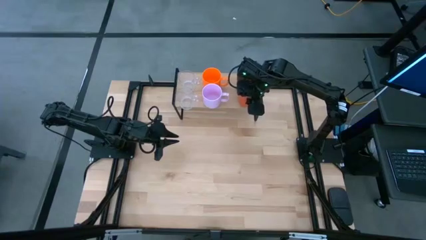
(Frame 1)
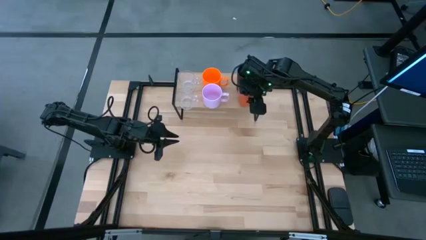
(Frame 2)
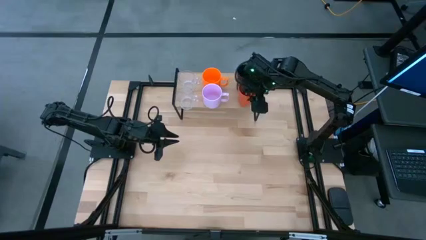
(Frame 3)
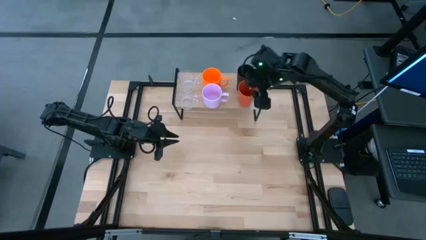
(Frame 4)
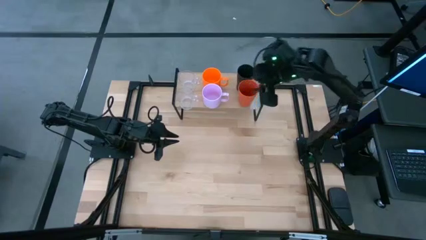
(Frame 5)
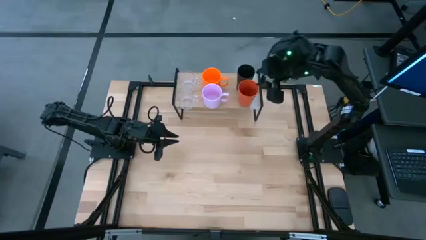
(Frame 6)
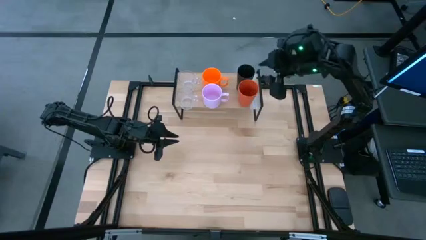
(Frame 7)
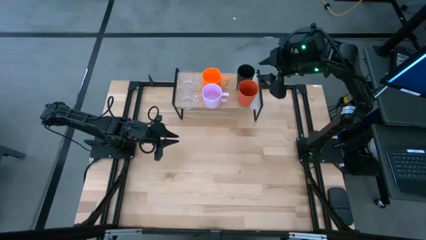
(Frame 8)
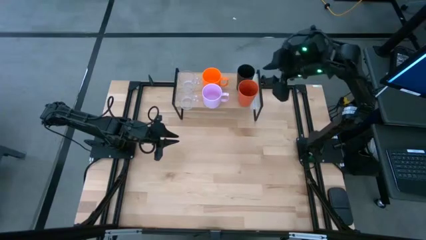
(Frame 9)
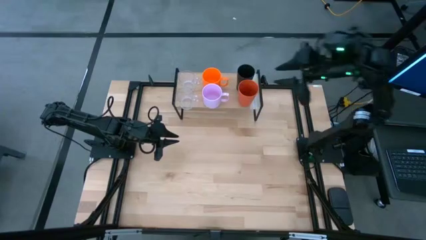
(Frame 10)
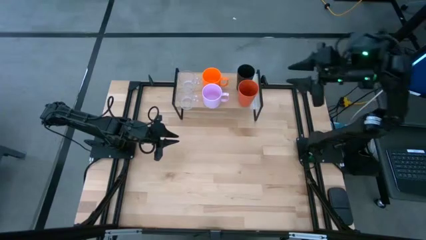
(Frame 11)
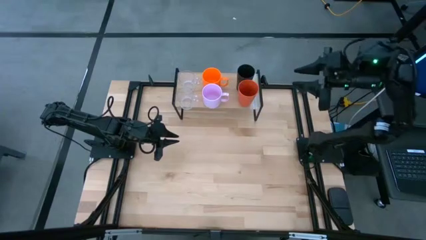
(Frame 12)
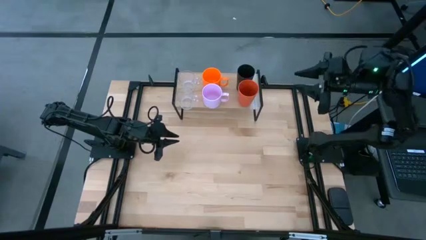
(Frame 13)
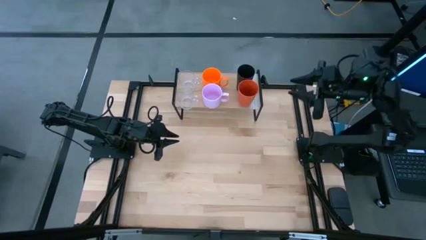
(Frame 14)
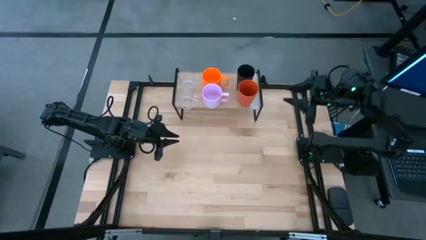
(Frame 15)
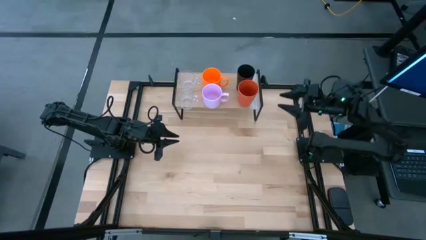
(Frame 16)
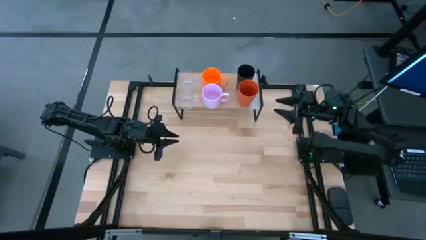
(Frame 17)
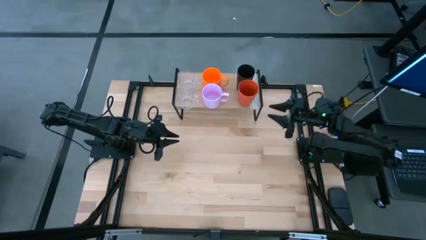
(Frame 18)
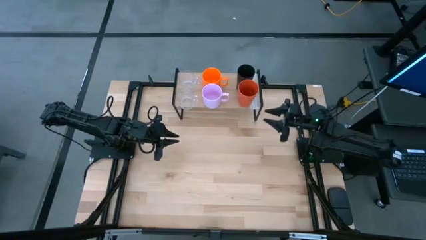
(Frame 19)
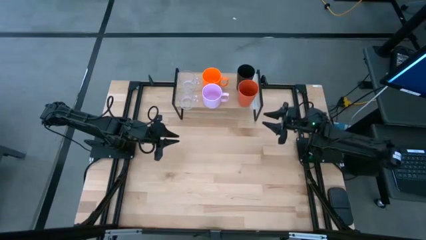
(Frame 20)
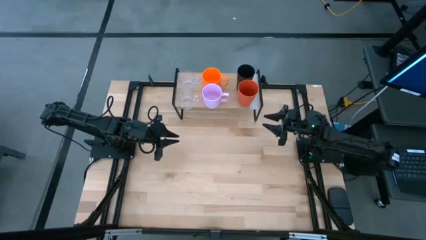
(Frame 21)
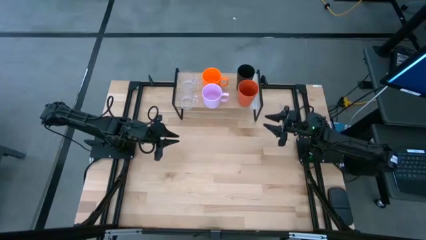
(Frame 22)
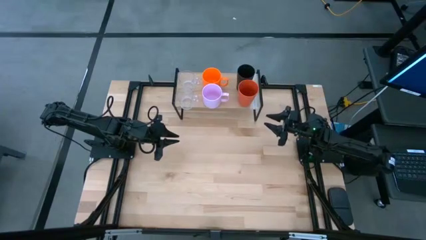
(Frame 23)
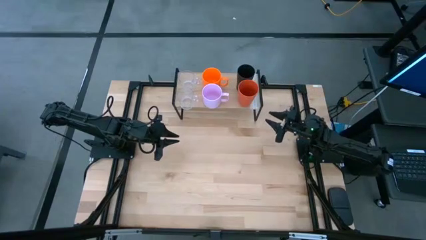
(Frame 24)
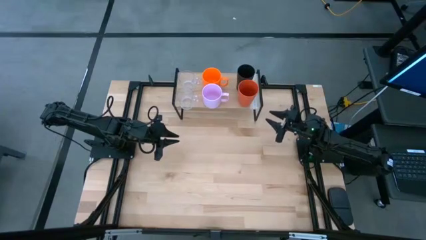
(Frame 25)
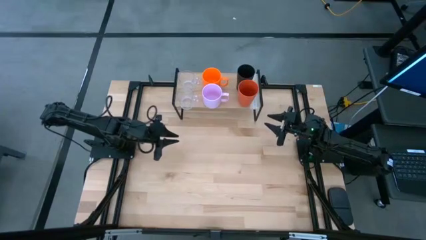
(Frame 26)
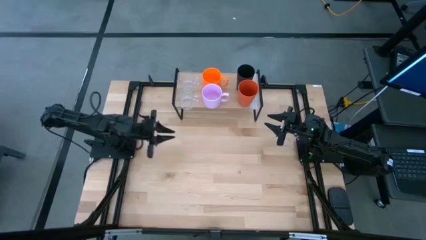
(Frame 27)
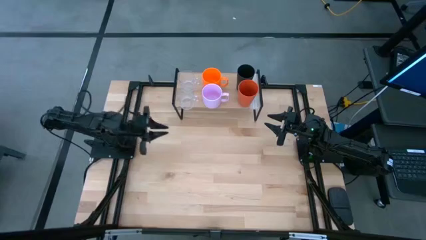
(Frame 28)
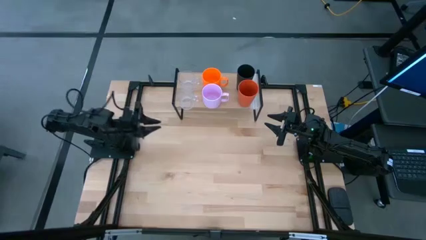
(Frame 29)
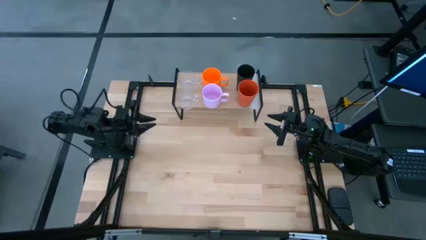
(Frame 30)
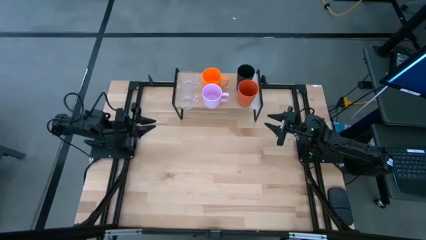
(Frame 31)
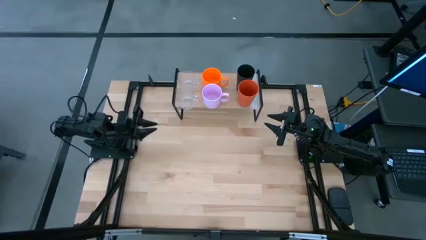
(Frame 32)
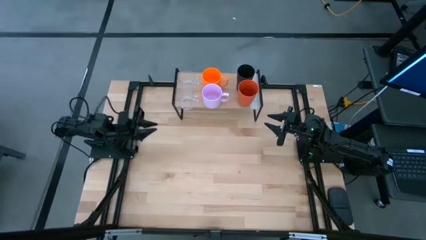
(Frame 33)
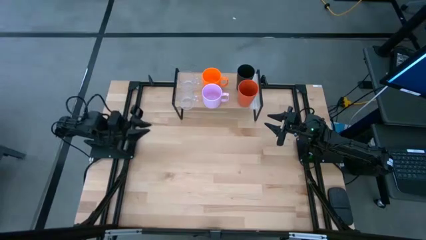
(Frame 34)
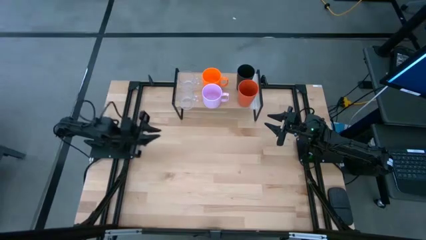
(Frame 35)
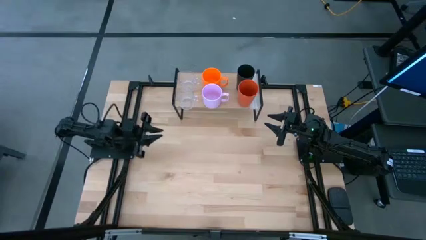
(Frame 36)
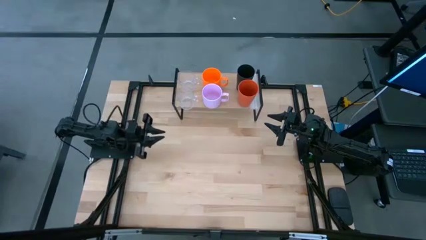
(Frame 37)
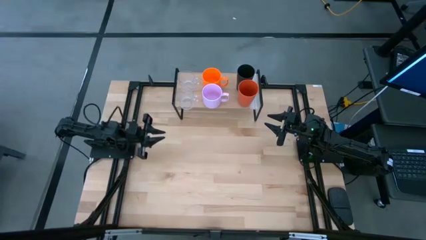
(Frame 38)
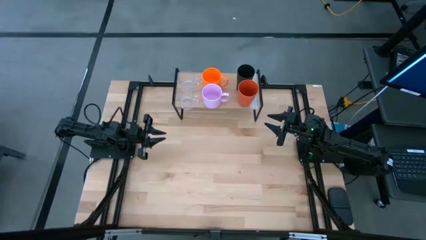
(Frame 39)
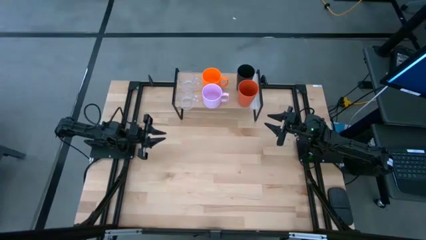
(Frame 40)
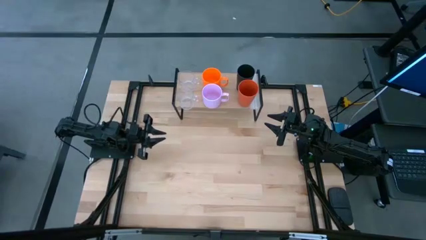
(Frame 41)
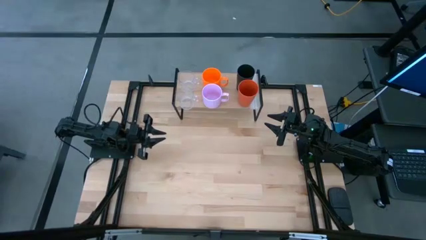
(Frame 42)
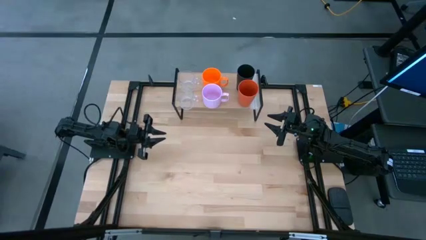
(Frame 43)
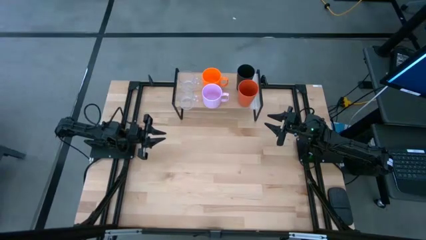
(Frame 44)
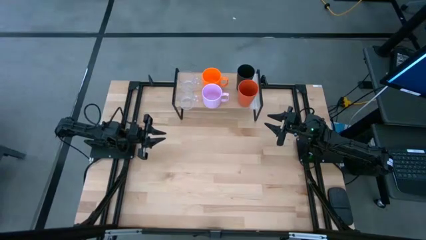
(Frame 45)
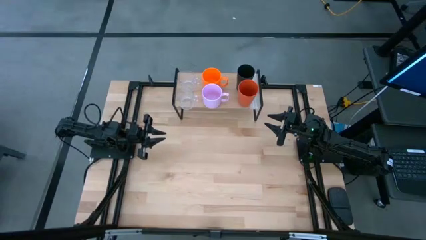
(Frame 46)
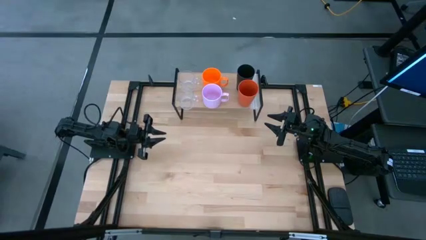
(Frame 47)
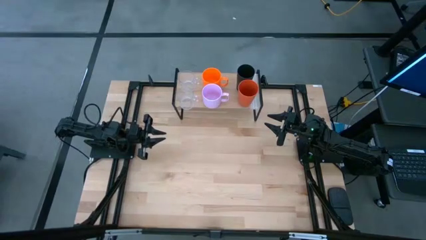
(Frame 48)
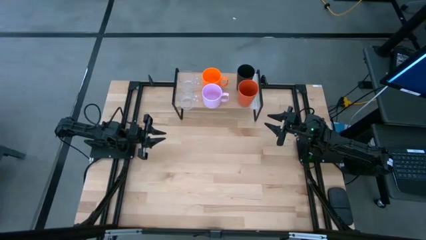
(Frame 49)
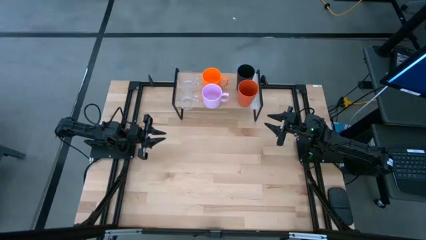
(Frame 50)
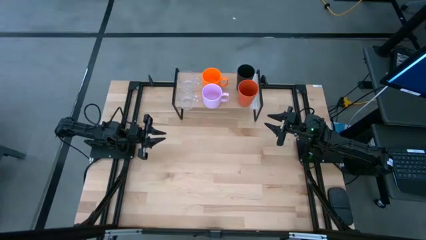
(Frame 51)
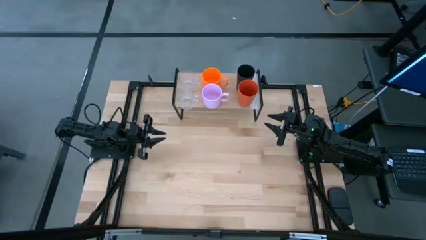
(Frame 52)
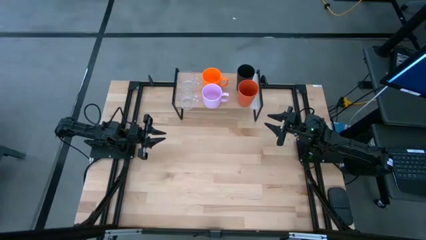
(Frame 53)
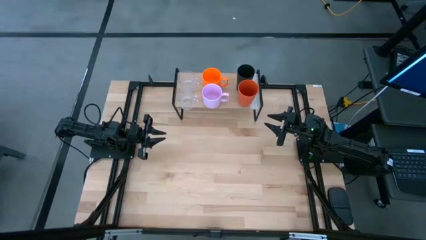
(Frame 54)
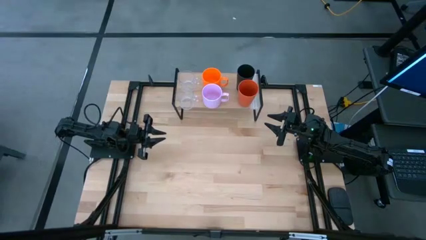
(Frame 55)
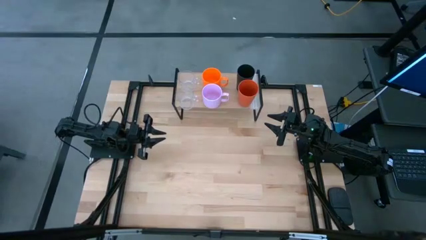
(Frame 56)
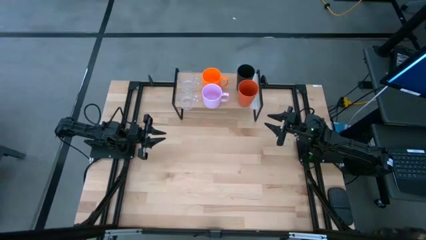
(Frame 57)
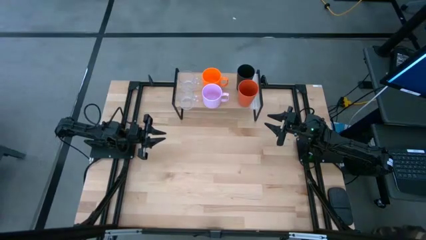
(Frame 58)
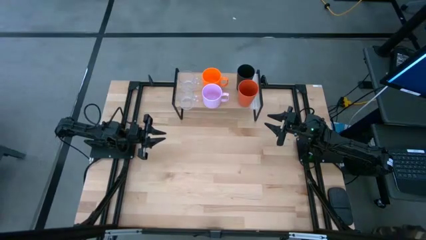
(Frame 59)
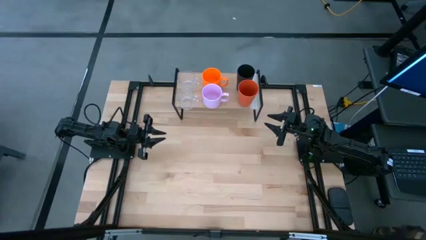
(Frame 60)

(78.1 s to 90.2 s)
Task: Stack small to large cups/mugs on shelf
Return to Home Position
